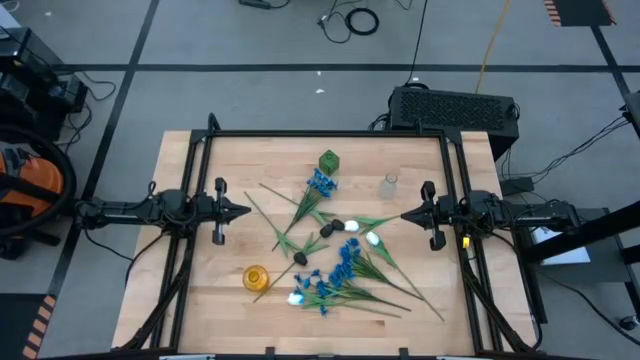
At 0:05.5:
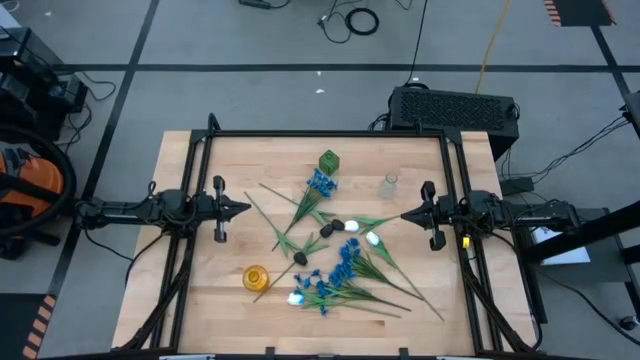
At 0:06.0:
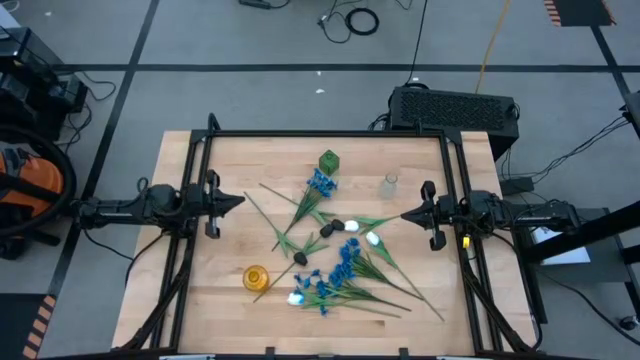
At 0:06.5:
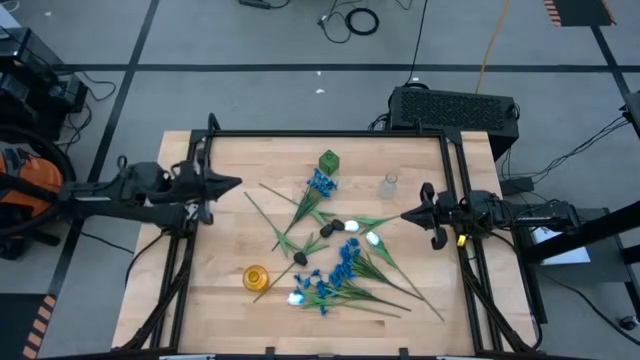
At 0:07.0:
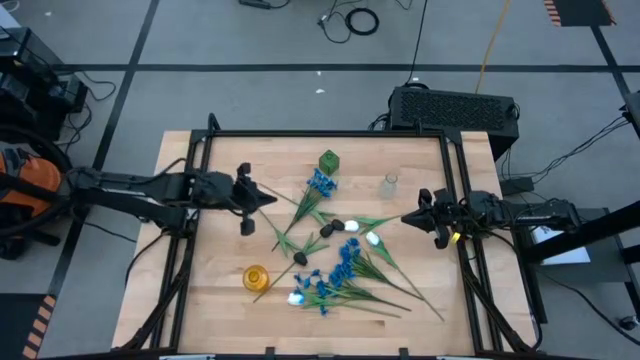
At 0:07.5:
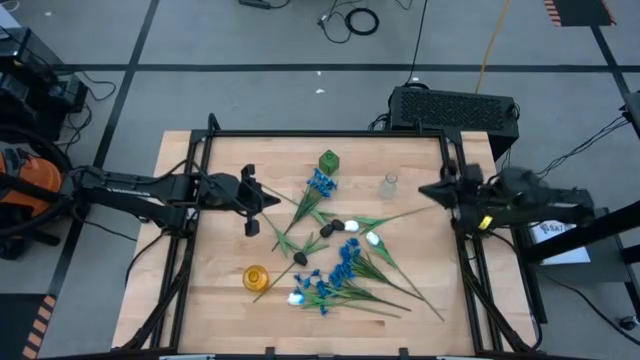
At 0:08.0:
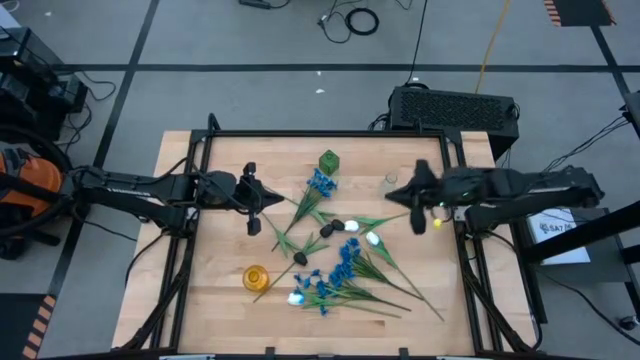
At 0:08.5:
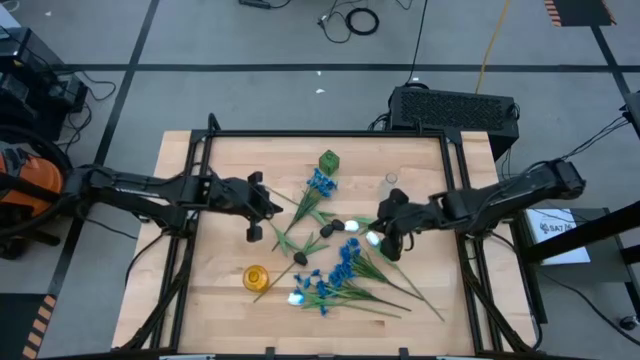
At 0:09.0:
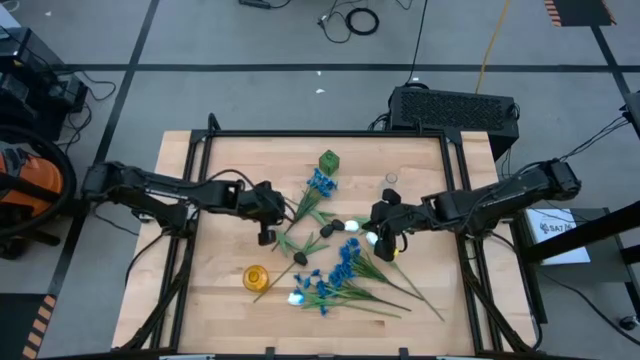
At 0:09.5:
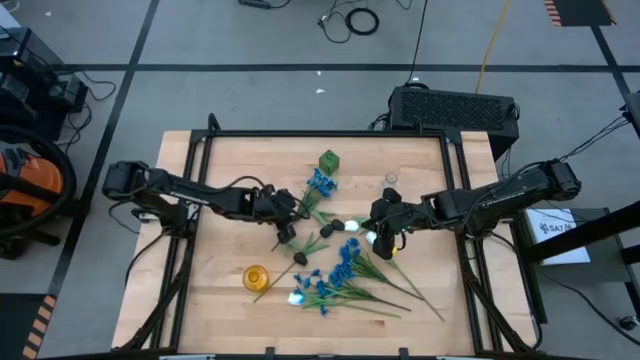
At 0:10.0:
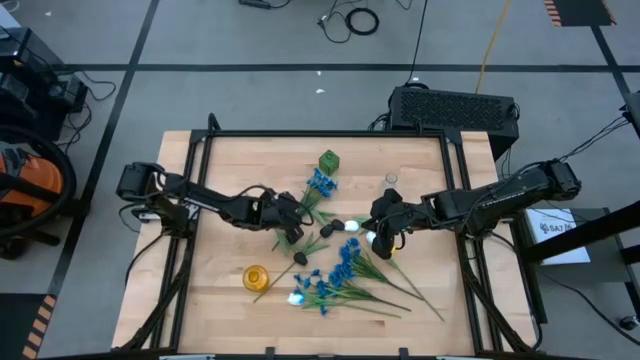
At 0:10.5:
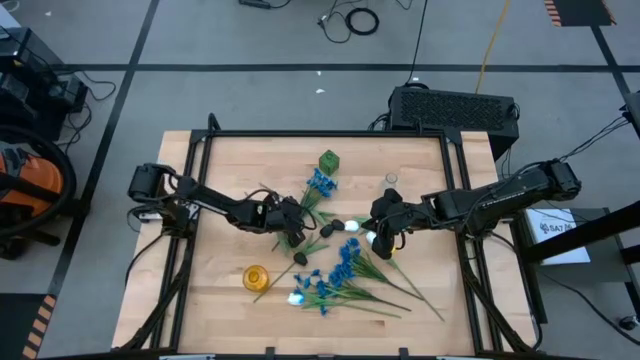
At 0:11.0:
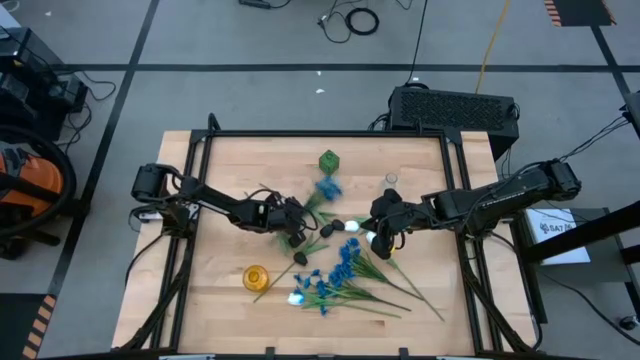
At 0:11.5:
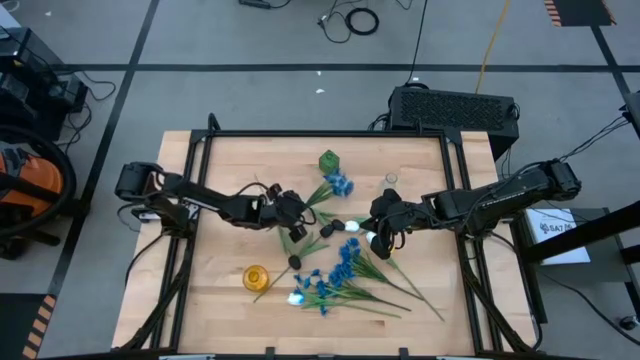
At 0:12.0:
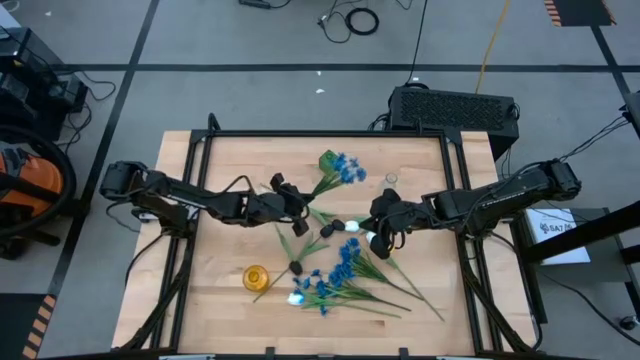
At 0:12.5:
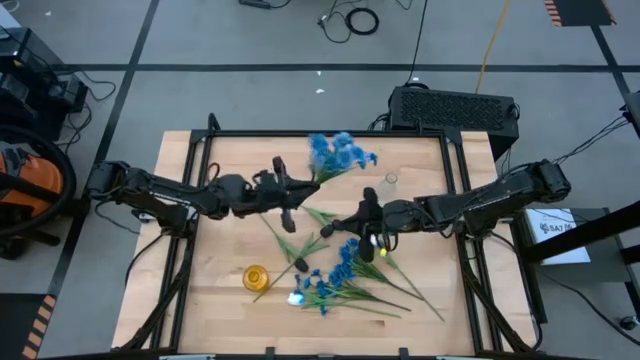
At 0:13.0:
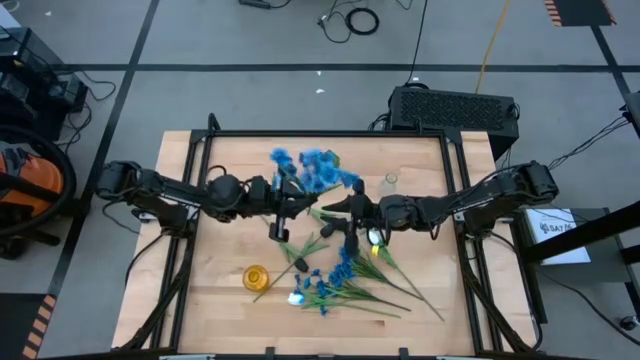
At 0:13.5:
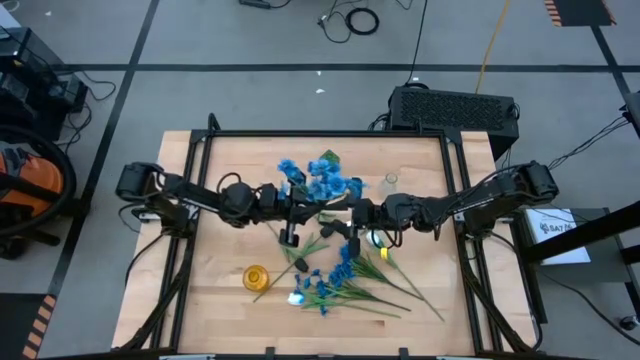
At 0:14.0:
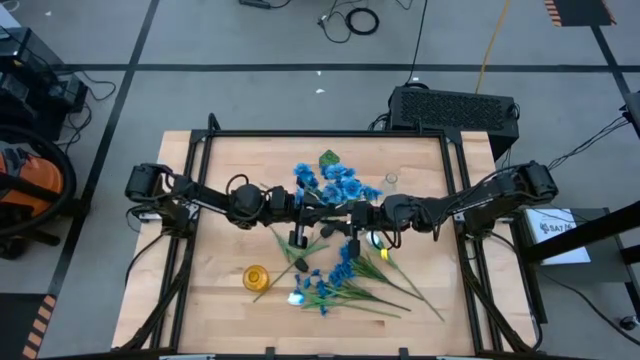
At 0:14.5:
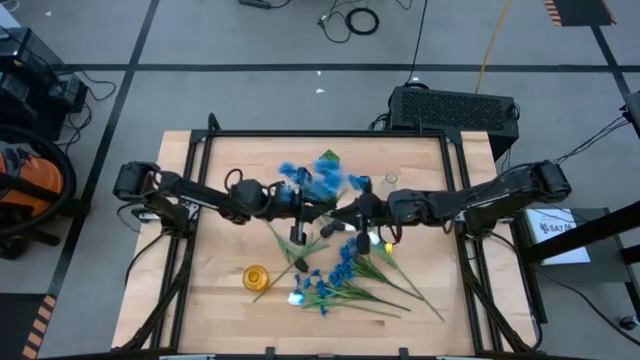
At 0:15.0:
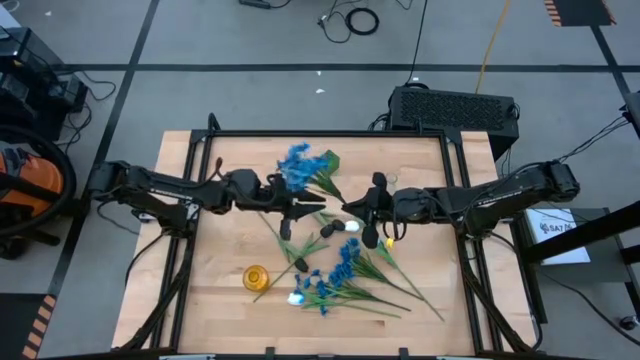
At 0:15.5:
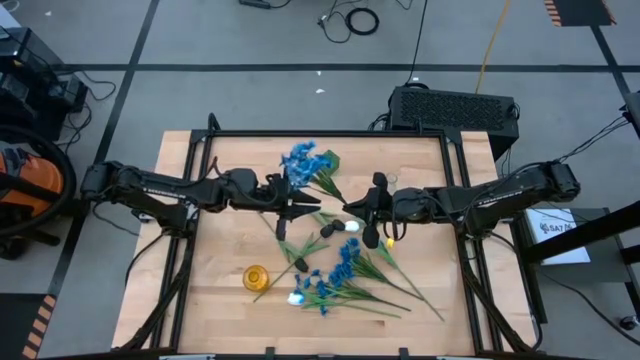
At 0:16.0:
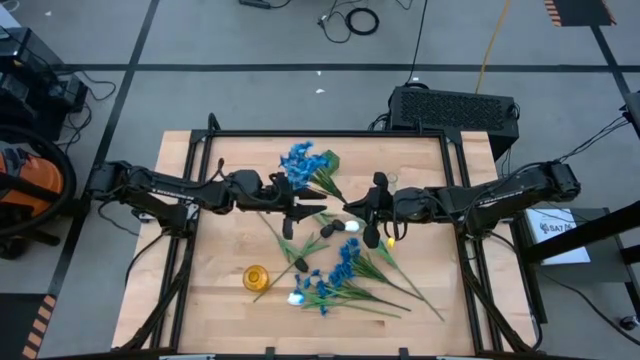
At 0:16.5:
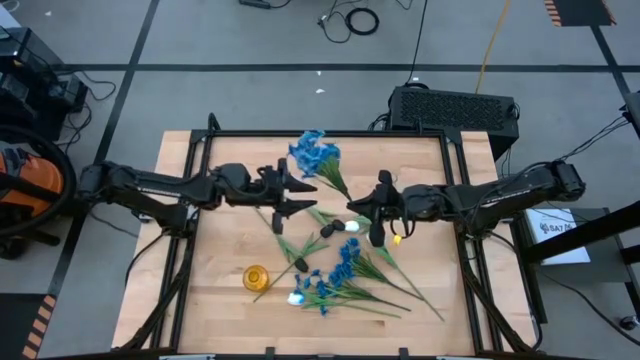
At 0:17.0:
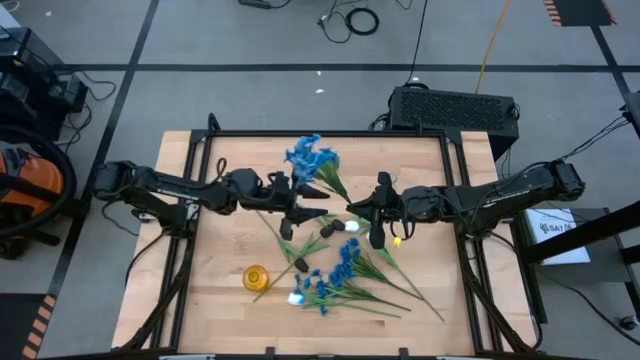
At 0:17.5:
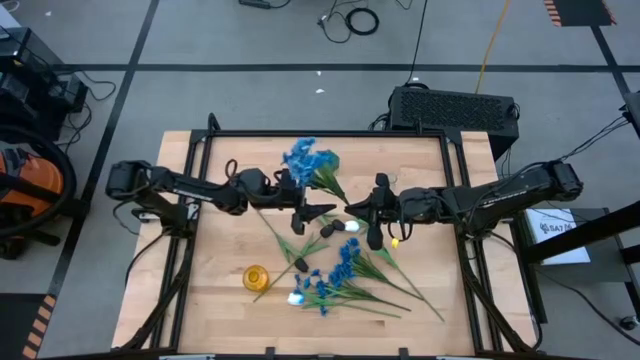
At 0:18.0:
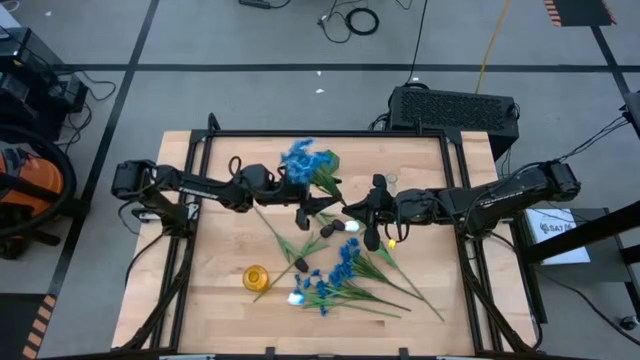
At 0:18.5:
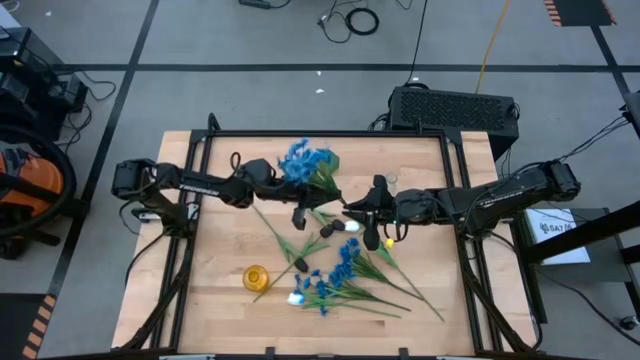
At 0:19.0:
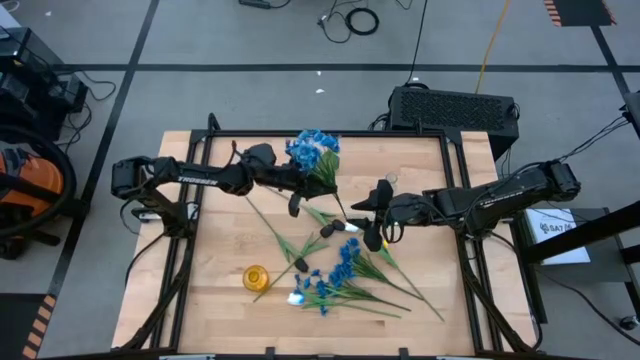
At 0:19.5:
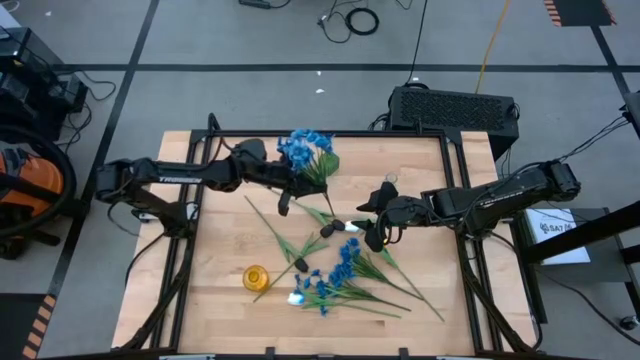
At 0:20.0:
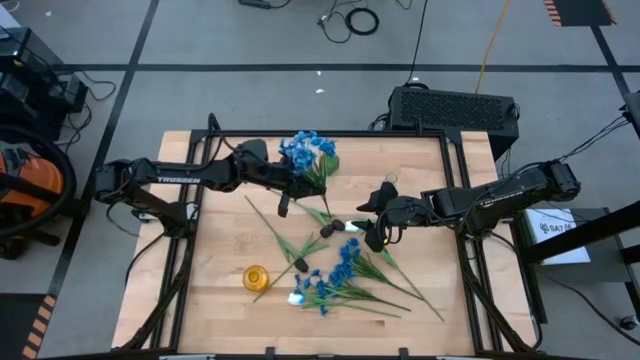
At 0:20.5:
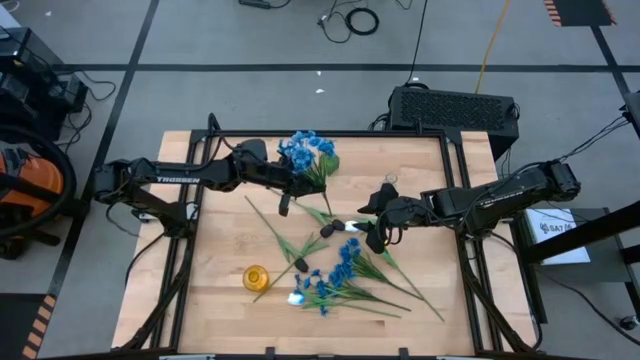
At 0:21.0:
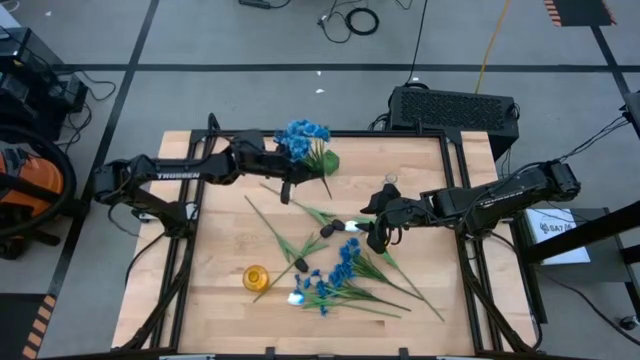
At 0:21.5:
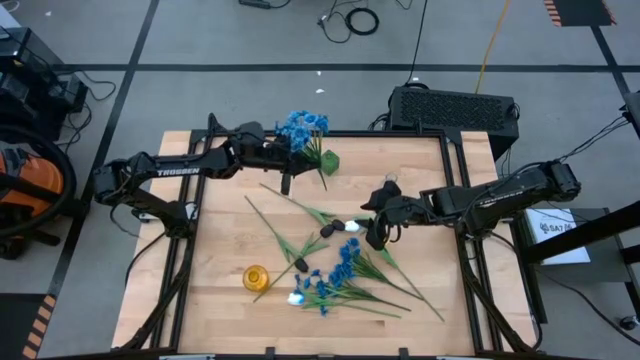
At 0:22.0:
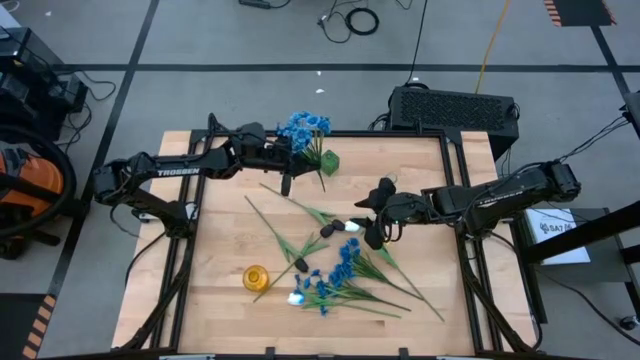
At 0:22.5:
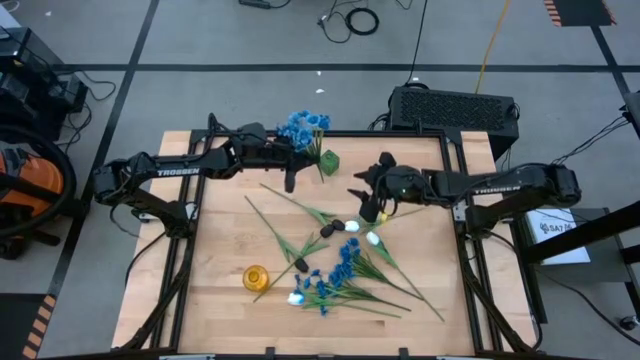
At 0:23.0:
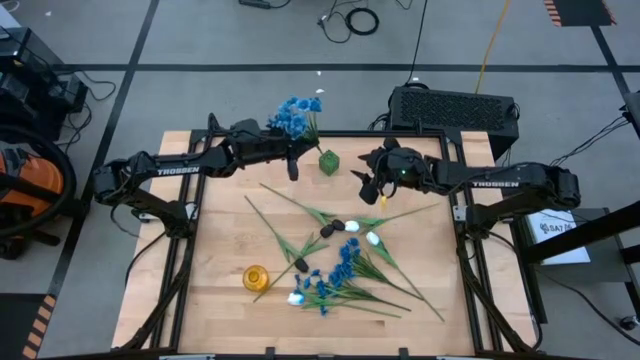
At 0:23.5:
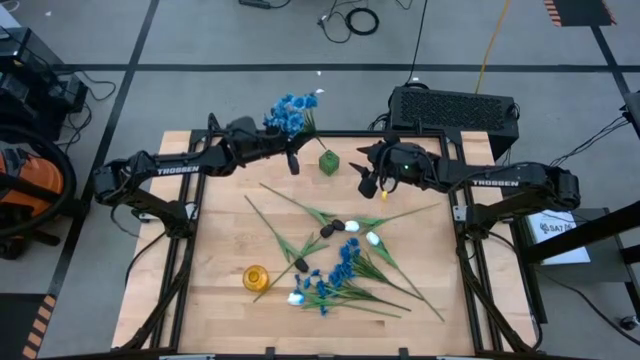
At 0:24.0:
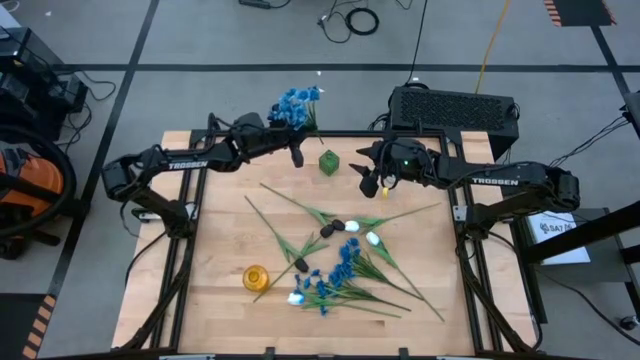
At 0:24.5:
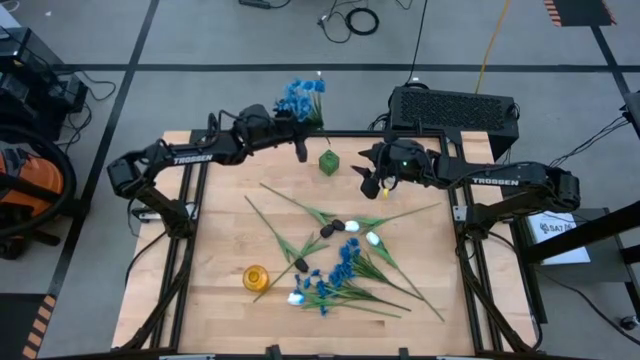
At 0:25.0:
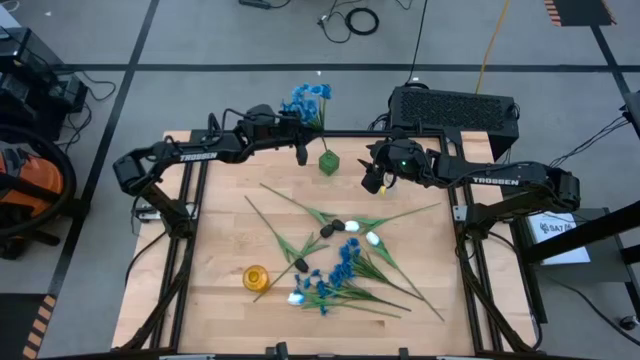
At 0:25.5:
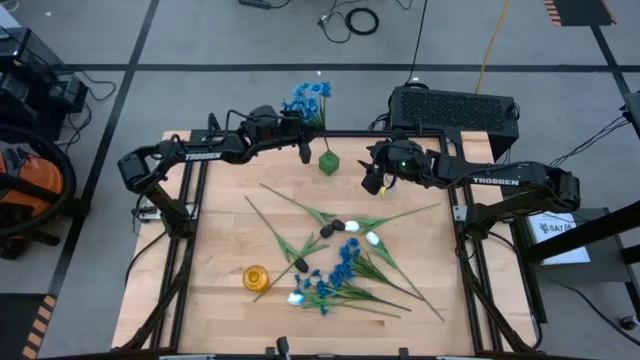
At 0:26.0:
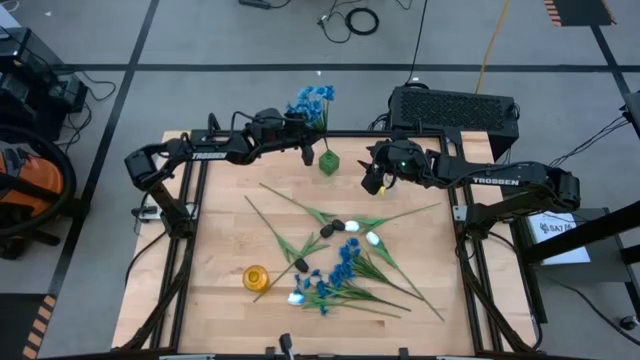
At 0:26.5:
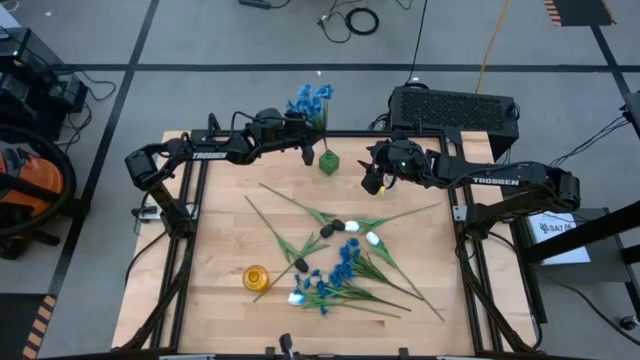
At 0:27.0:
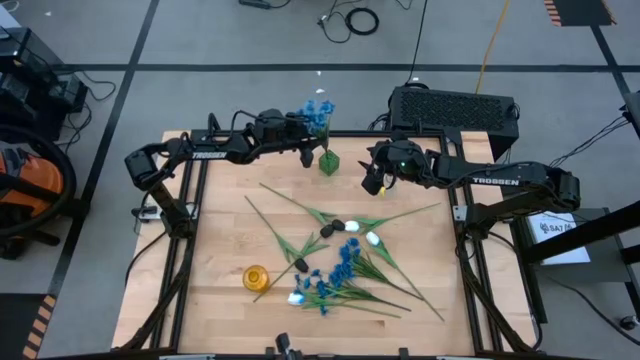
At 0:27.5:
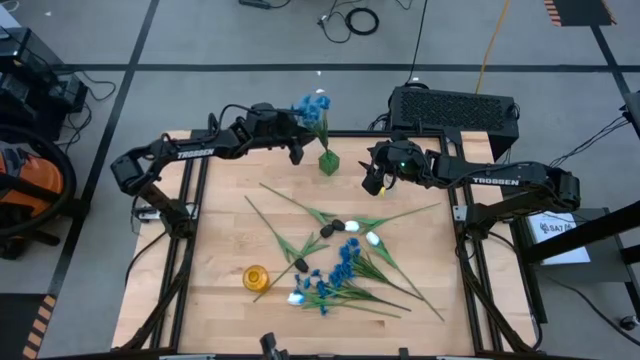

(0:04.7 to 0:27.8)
Task: Sort flowers into vase by color
Put the top blue flowers into the green vase
